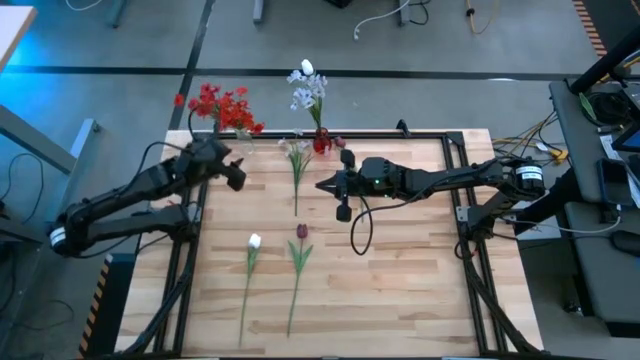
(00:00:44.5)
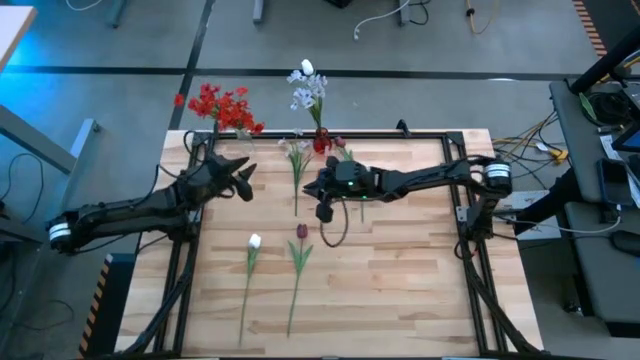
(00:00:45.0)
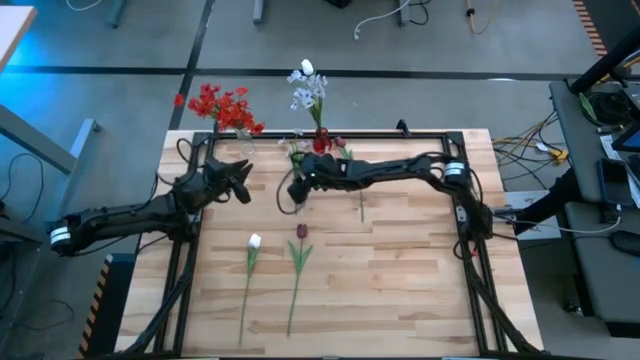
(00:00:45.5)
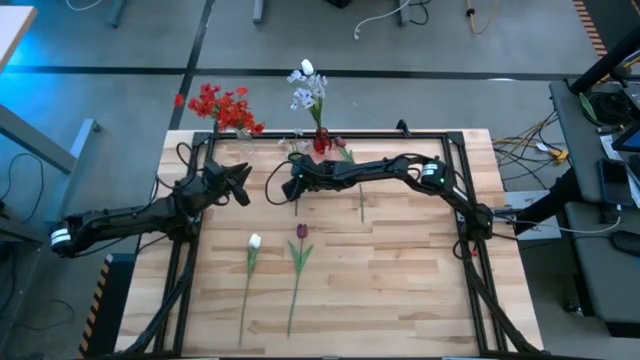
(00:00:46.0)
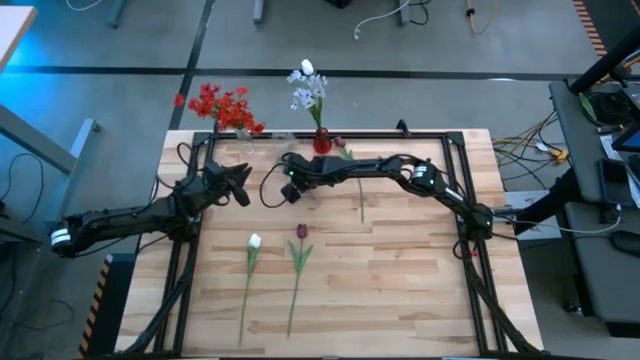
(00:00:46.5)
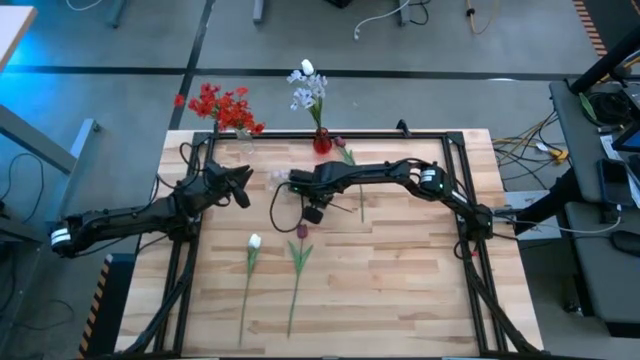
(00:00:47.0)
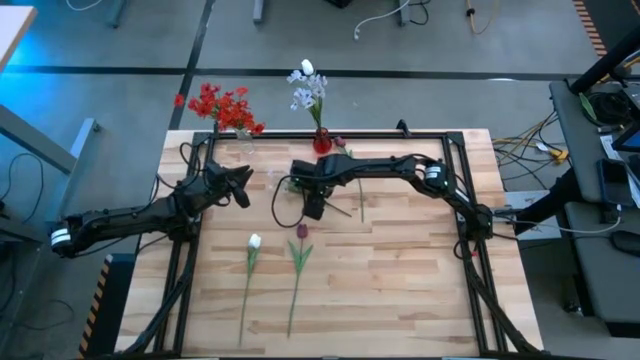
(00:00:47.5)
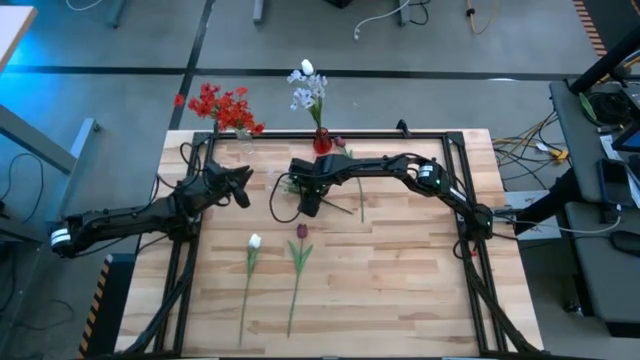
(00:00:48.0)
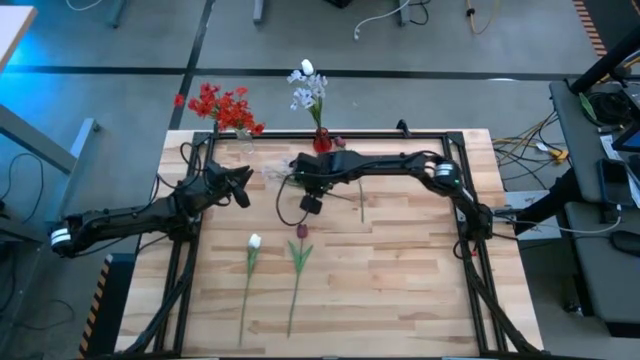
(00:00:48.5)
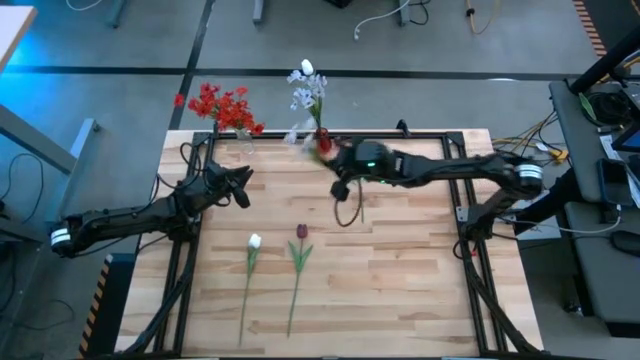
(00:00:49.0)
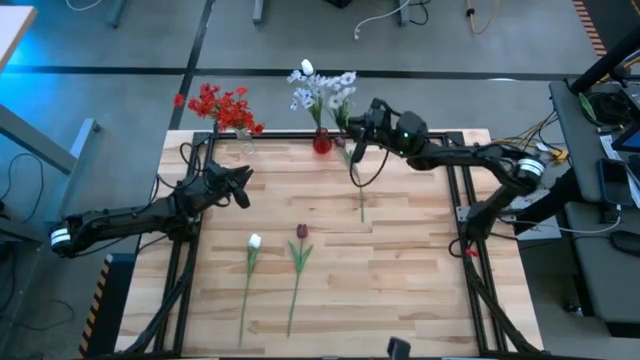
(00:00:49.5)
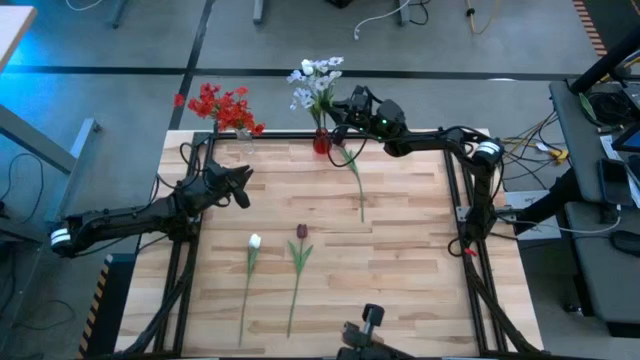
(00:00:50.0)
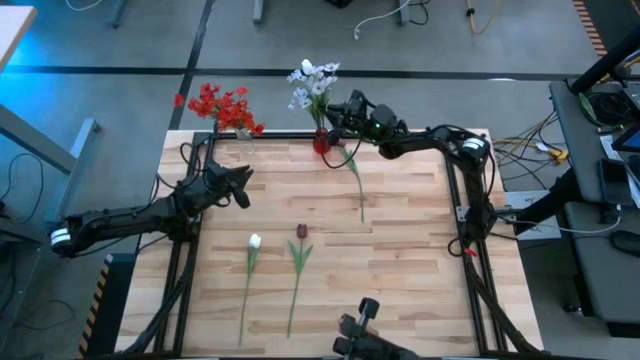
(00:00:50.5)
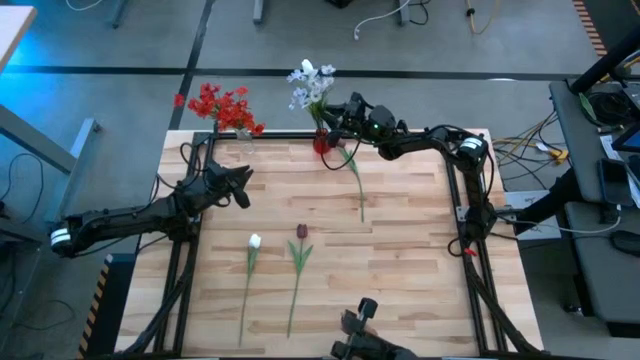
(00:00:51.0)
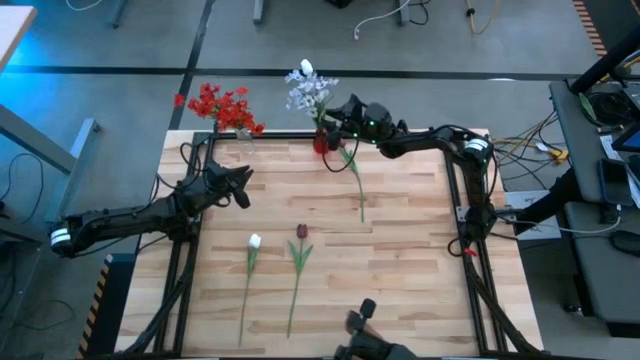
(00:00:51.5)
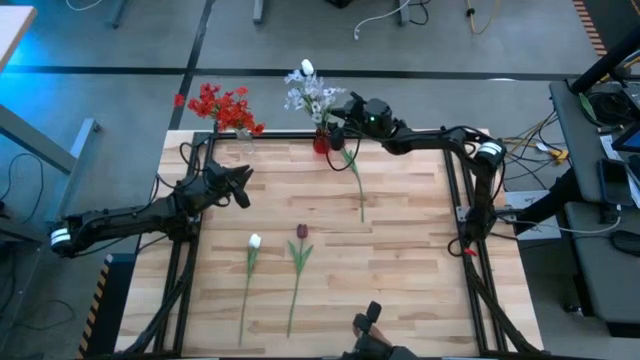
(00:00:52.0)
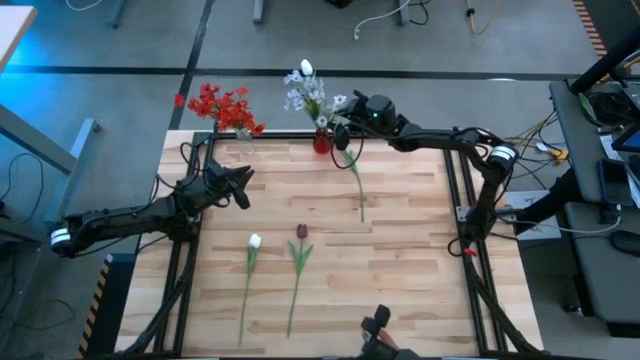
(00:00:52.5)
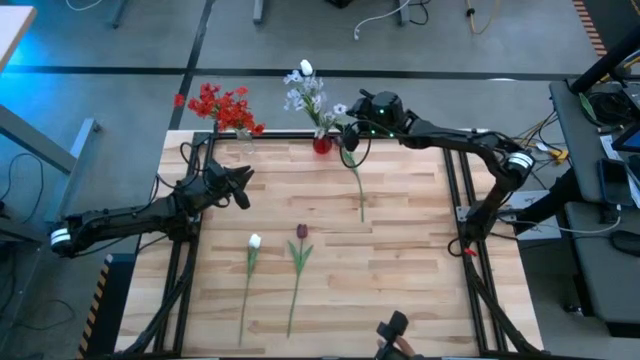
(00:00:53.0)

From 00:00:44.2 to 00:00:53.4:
Task: Sort flowers into vase by color
Put the white flowers into the red vase

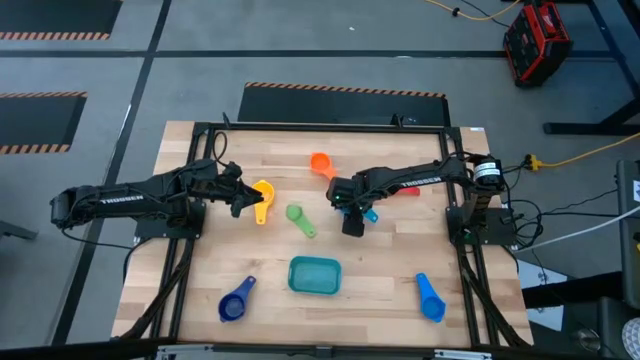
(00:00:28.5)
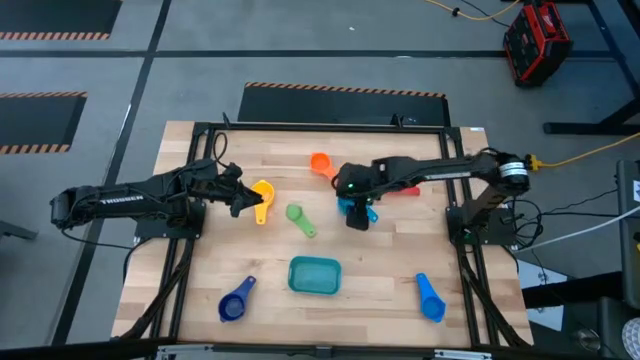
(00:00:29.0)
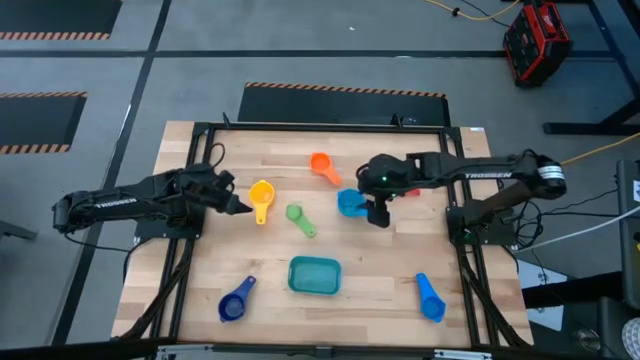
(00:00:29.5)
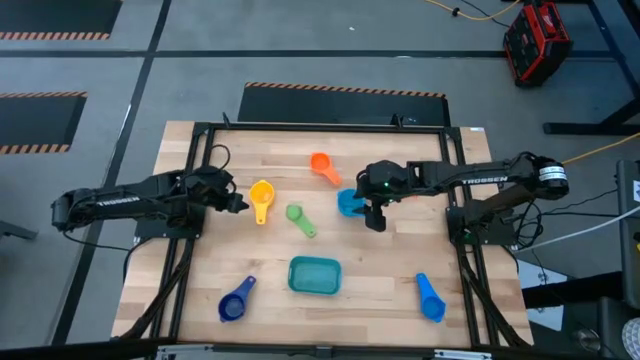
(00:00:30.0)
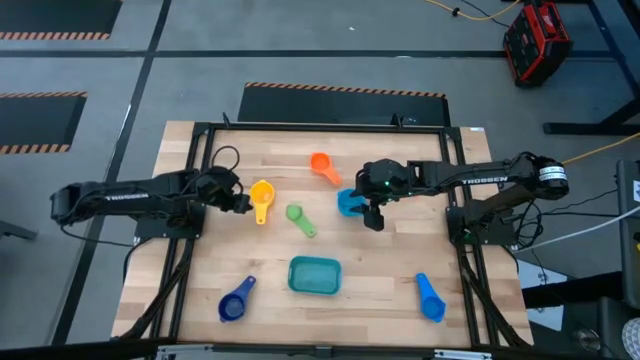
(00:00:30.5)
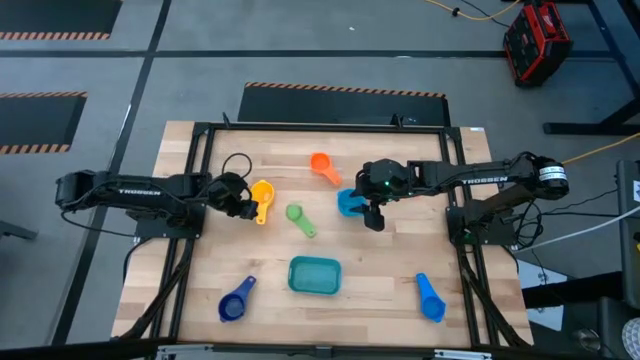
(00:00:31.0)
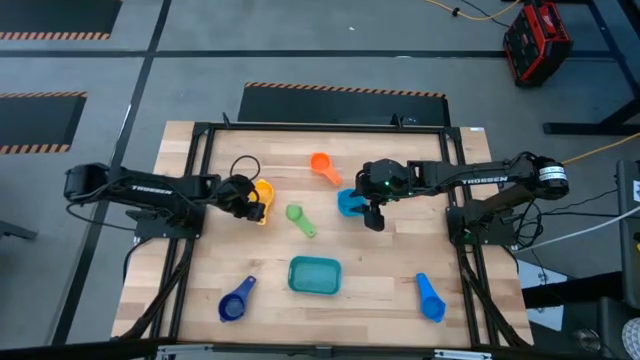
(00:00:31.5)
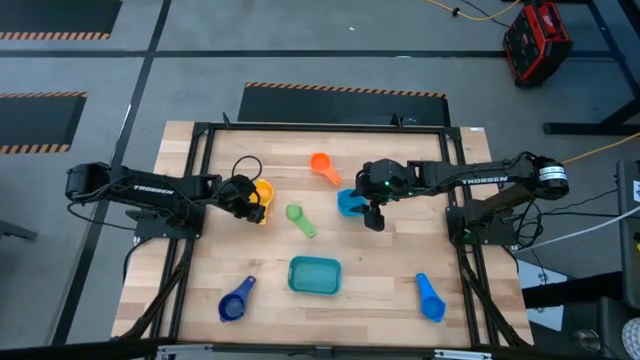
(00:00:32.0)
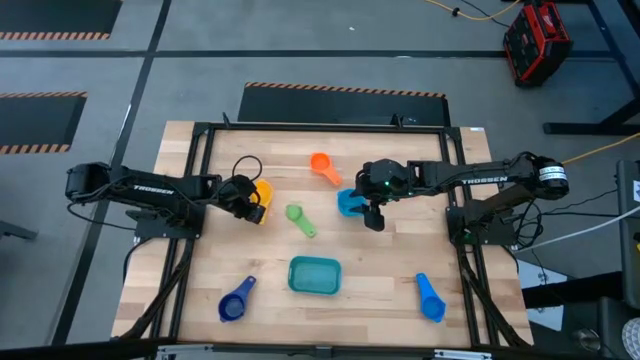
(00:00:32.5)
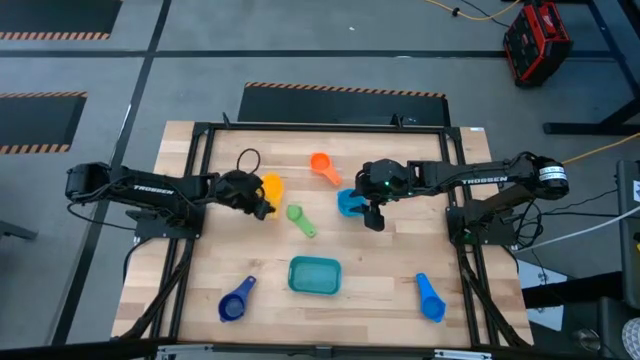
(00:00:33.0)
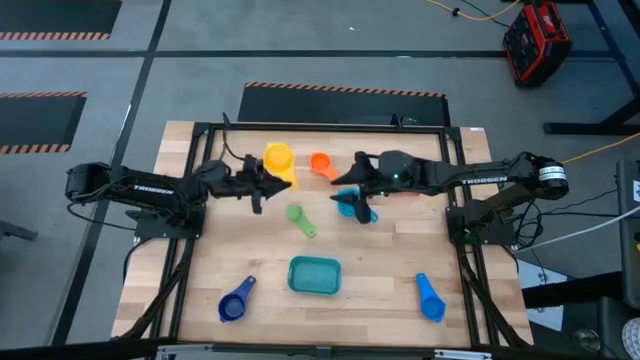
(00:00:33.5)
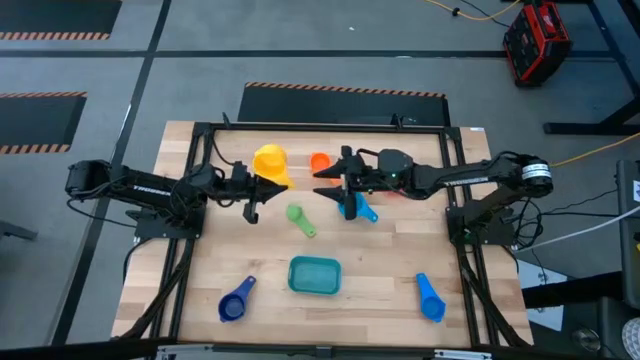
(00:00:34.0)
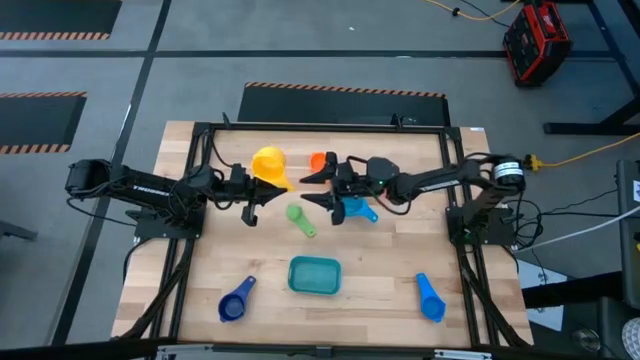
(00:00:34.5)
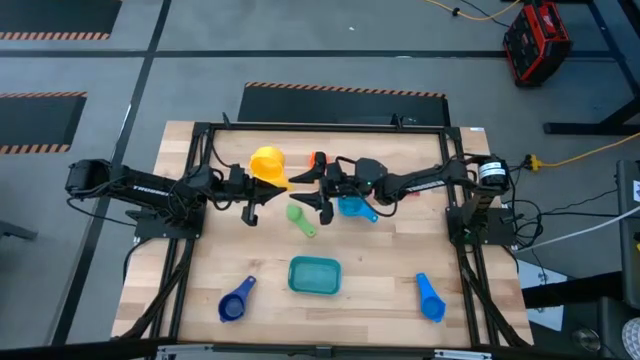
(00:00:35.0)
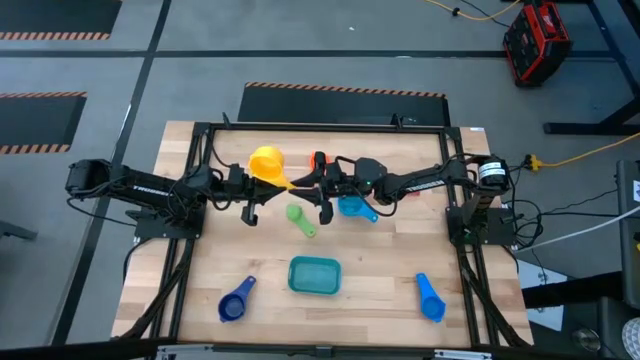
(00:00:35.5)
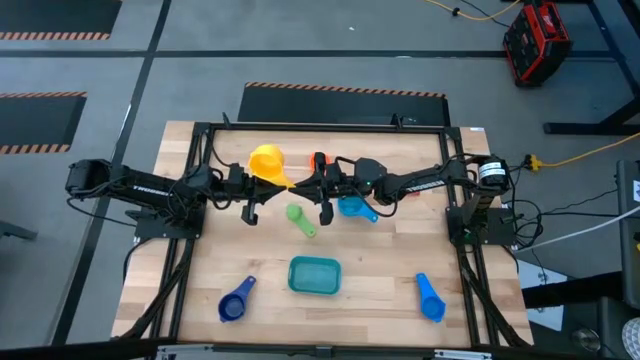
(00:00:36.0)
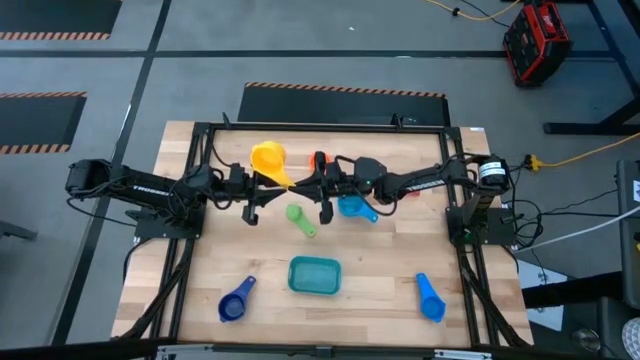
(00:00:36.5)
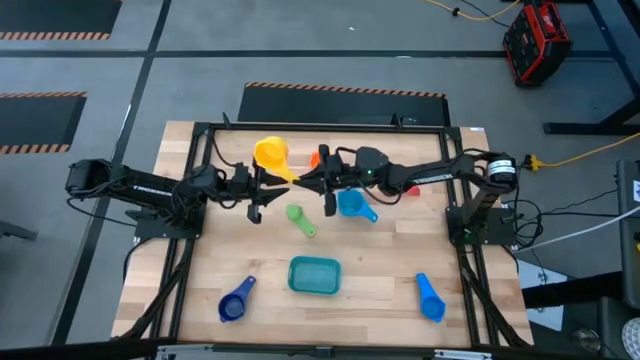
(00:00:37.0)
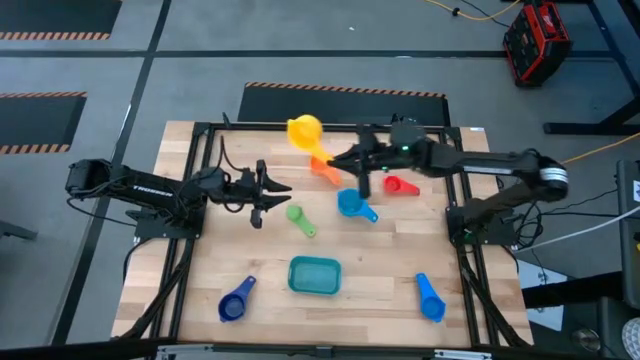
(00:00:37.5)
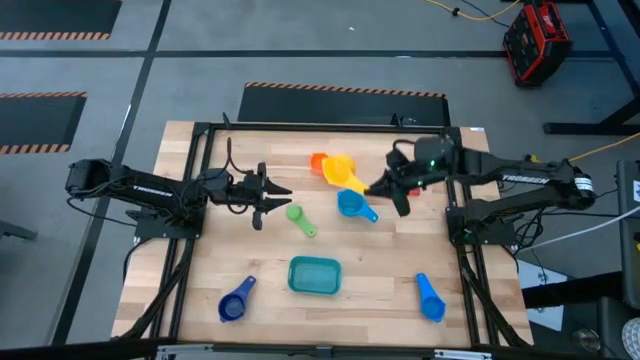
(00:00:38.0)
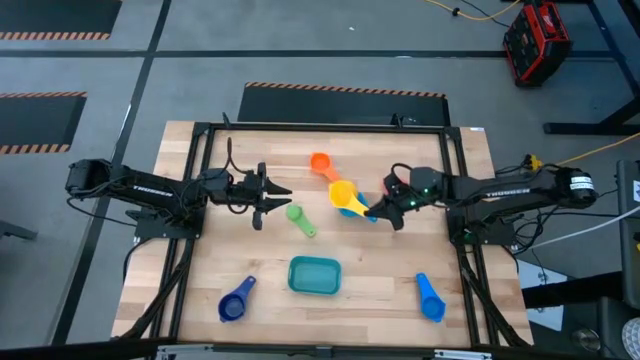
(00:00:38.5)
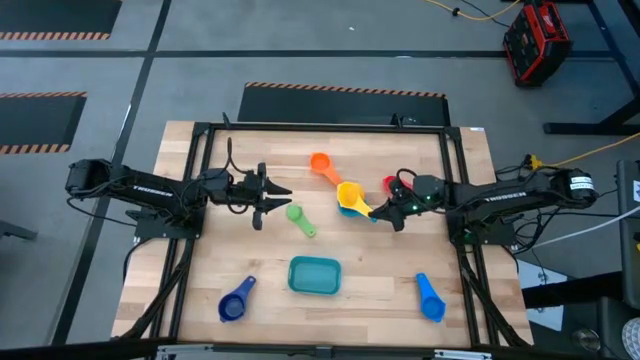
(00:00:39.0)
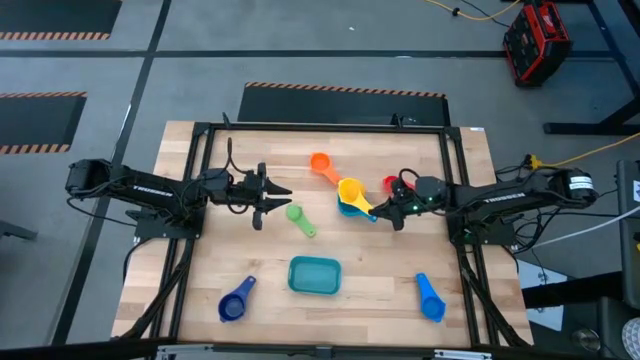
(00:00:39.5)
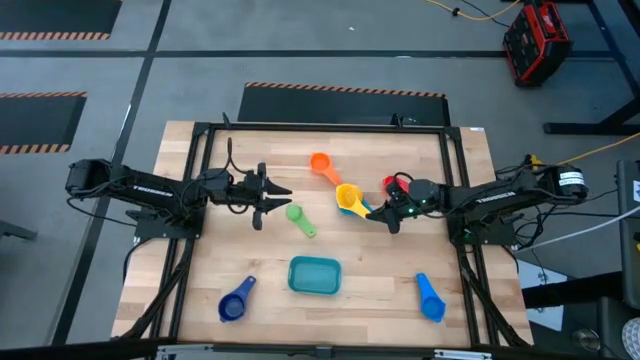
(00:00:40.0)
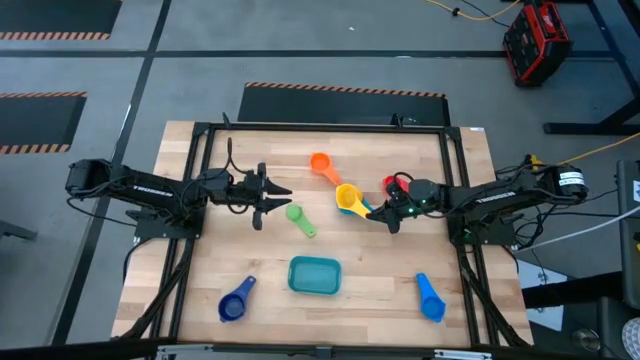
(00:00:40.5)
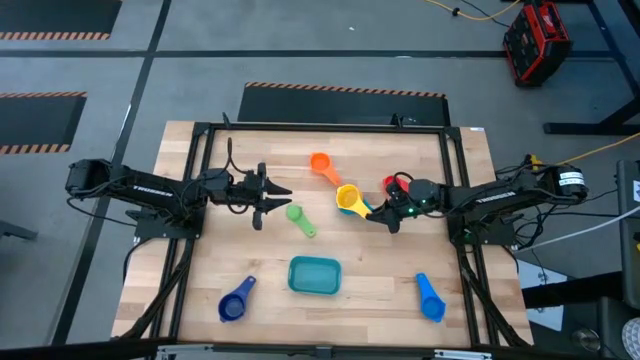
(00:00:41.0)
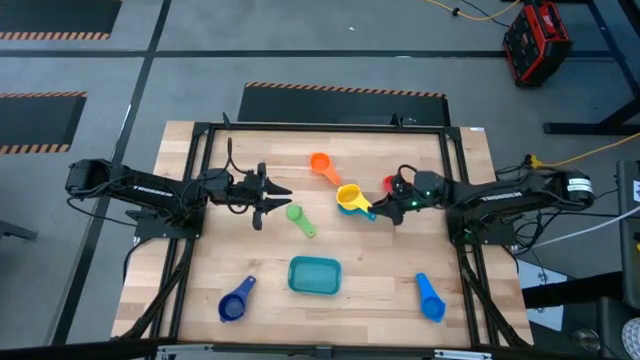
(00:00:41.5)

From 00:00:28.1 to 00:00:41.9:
Task: Nest measuring cups in basket
Stack the yellow measuring cup on top of the light blue measuring cup
